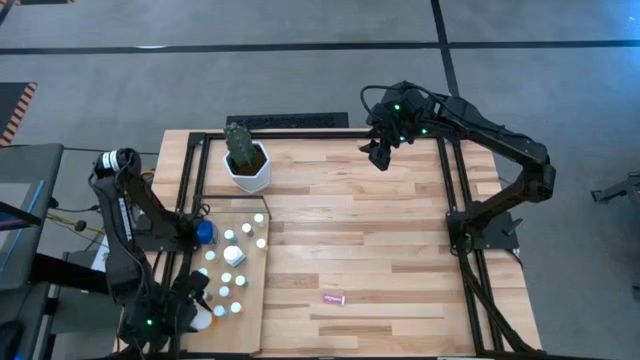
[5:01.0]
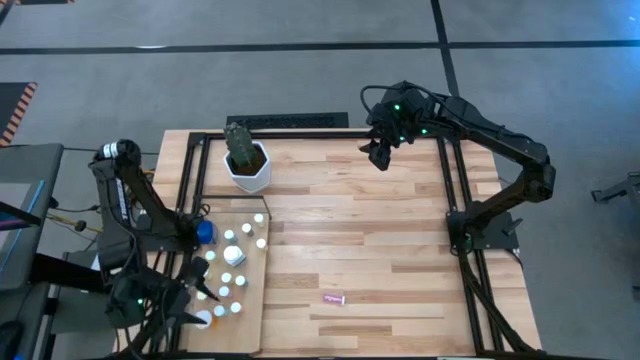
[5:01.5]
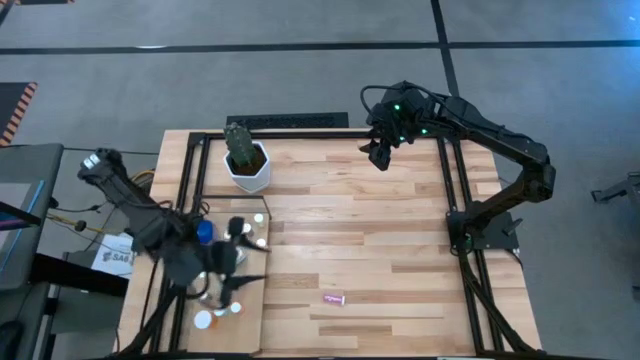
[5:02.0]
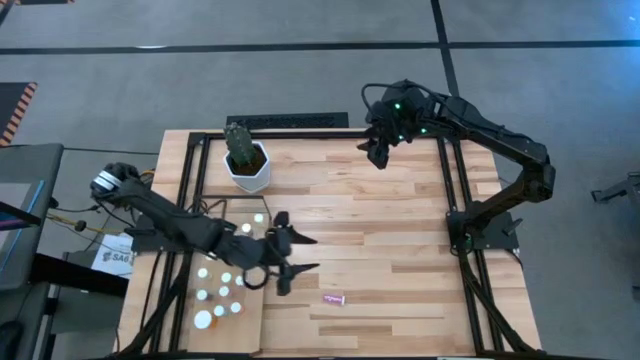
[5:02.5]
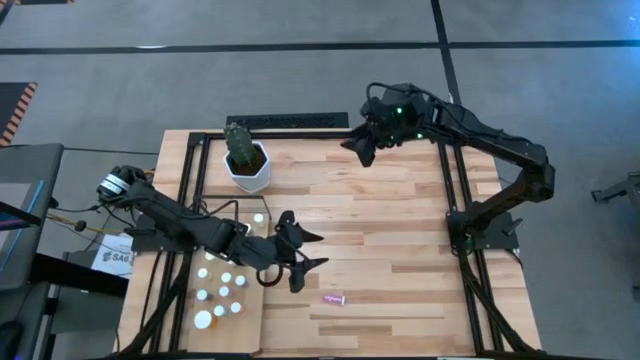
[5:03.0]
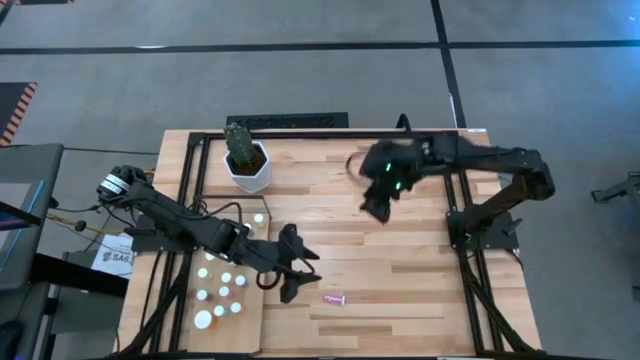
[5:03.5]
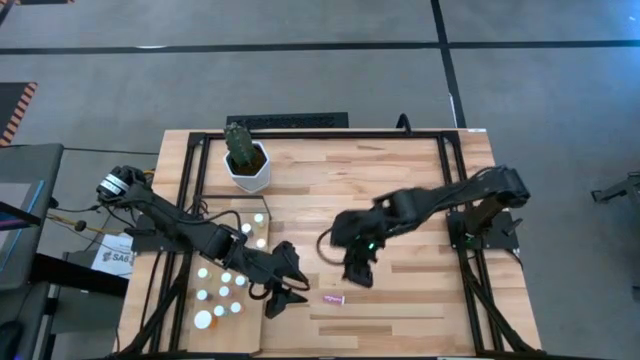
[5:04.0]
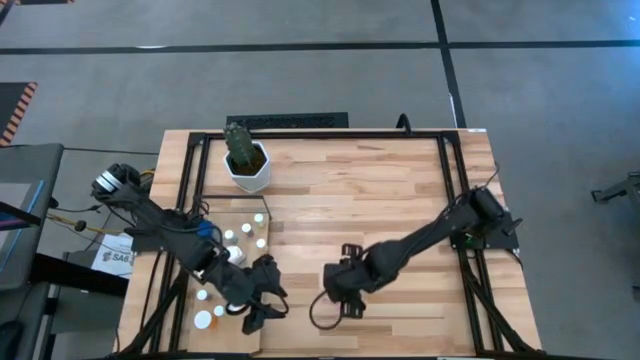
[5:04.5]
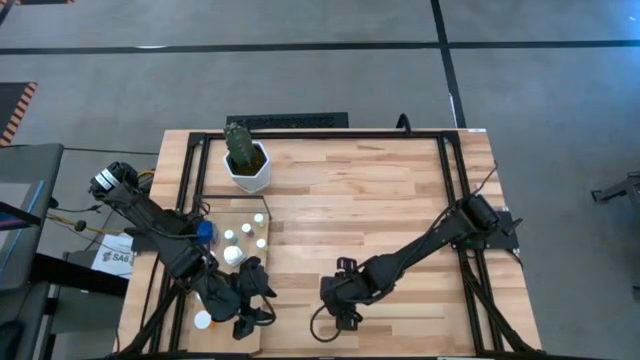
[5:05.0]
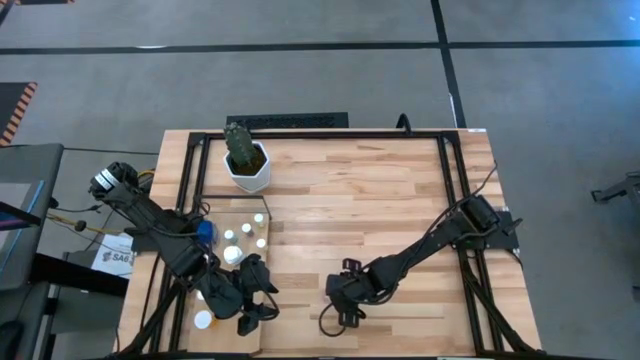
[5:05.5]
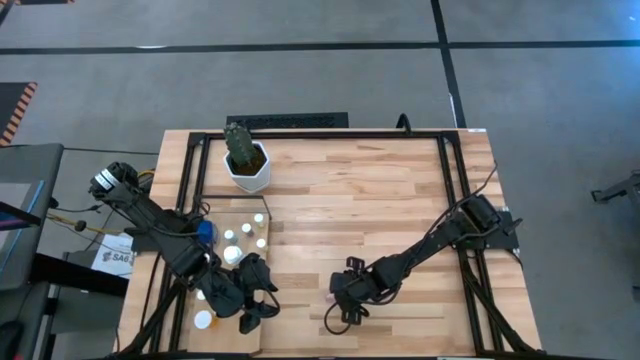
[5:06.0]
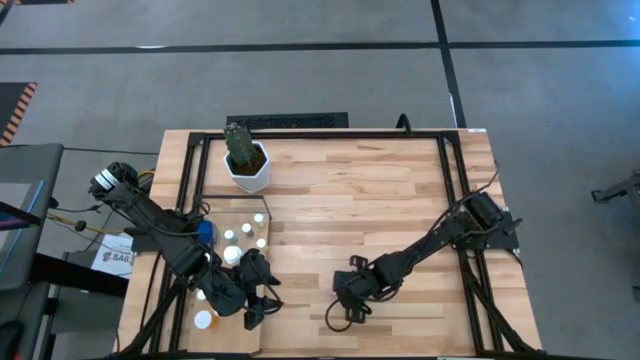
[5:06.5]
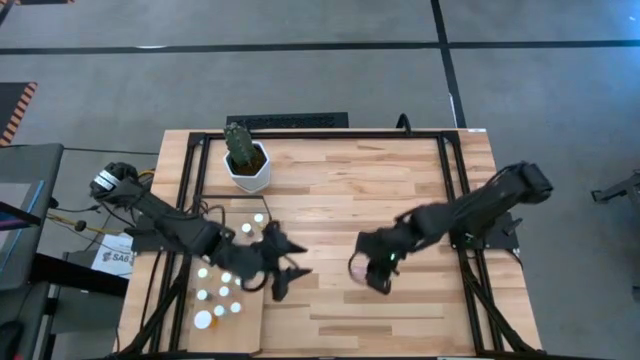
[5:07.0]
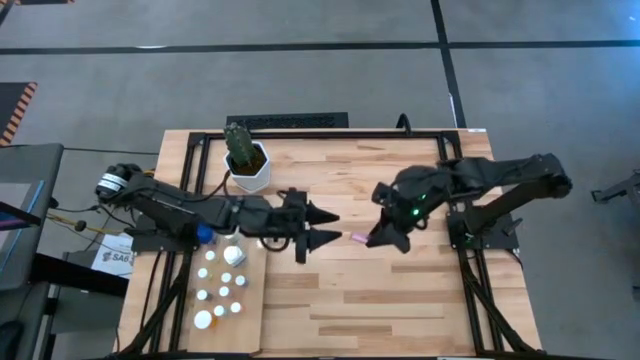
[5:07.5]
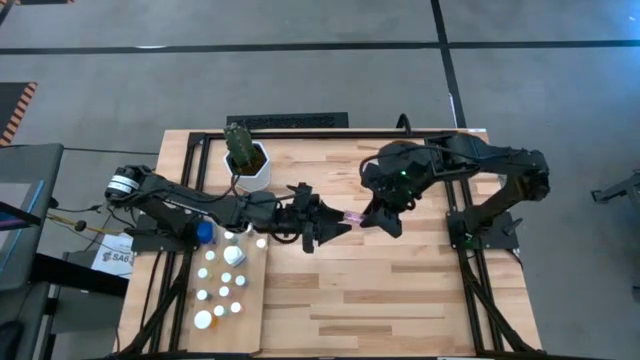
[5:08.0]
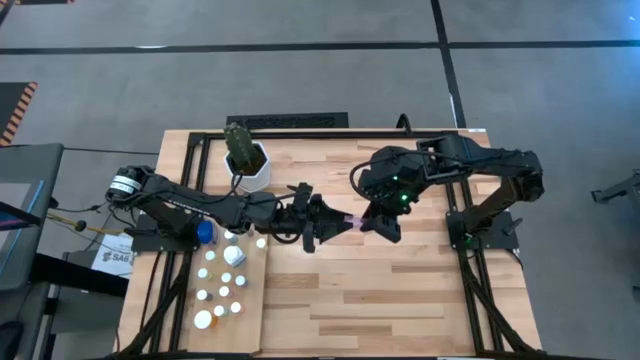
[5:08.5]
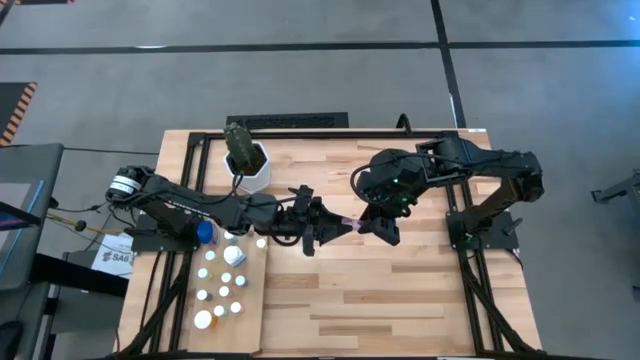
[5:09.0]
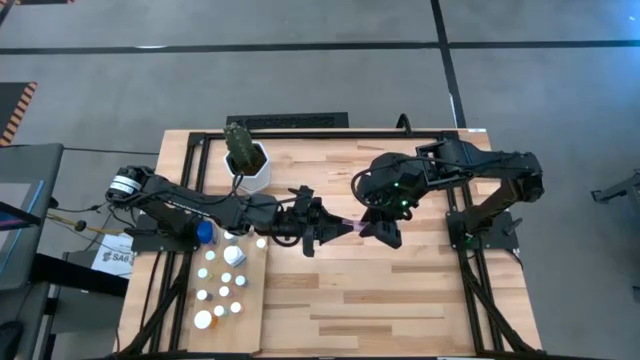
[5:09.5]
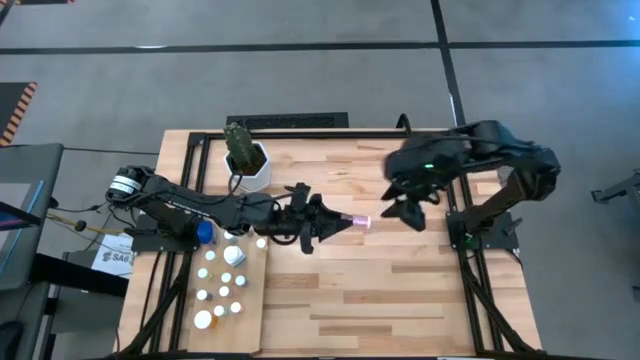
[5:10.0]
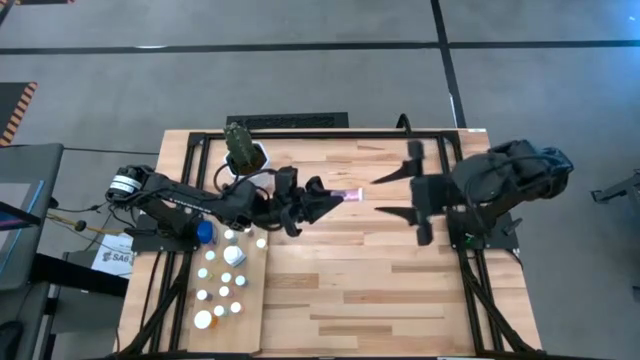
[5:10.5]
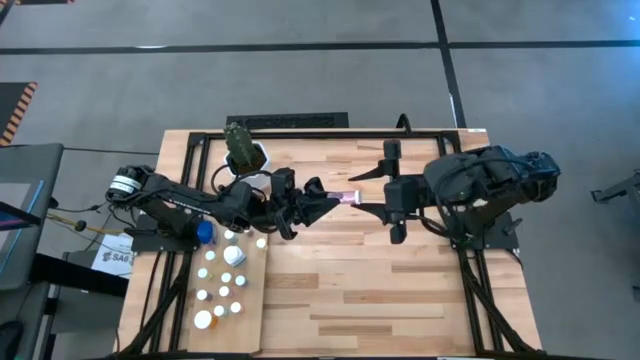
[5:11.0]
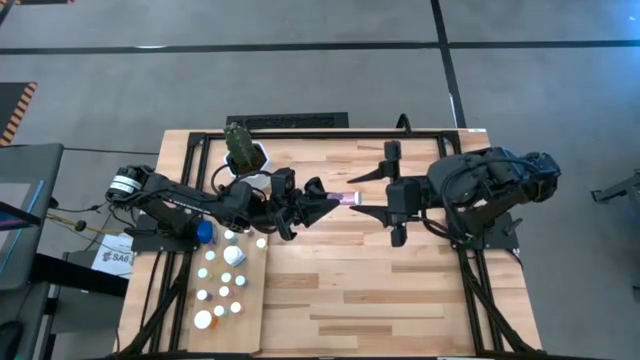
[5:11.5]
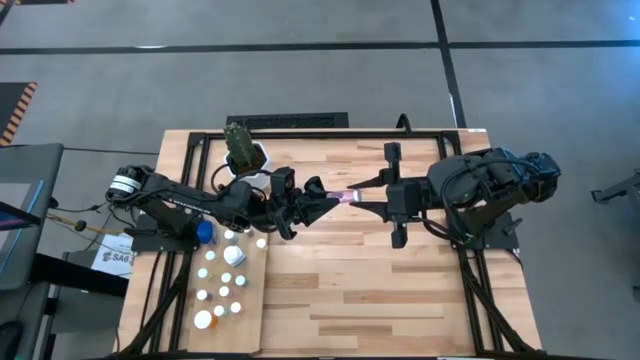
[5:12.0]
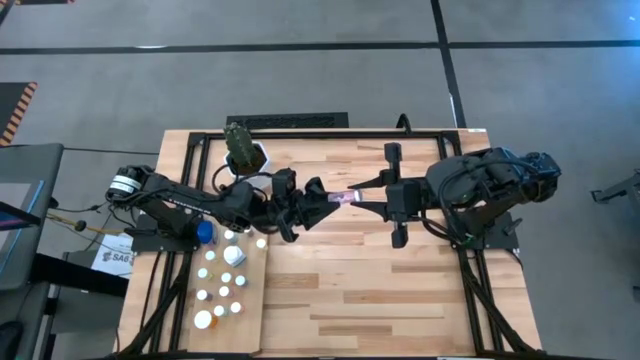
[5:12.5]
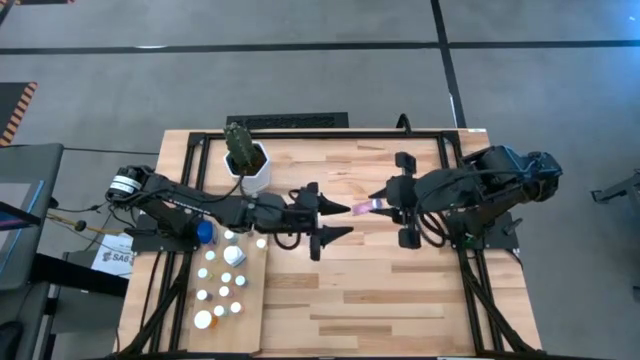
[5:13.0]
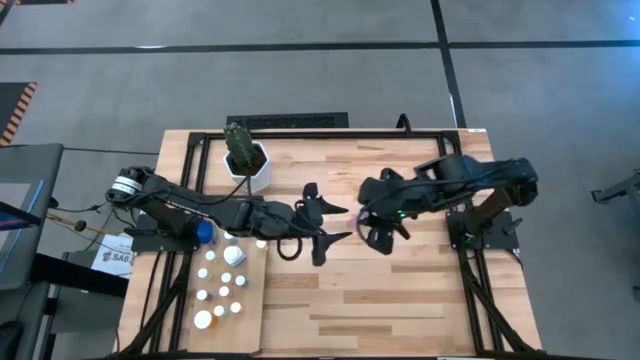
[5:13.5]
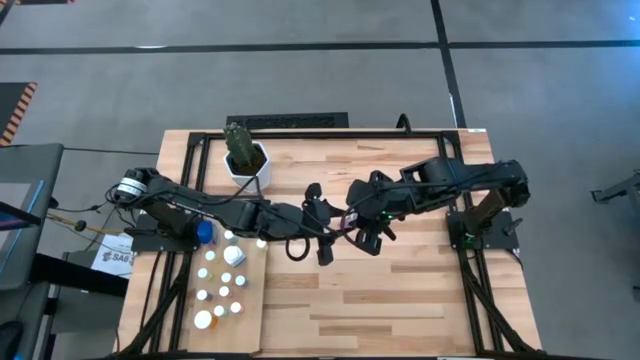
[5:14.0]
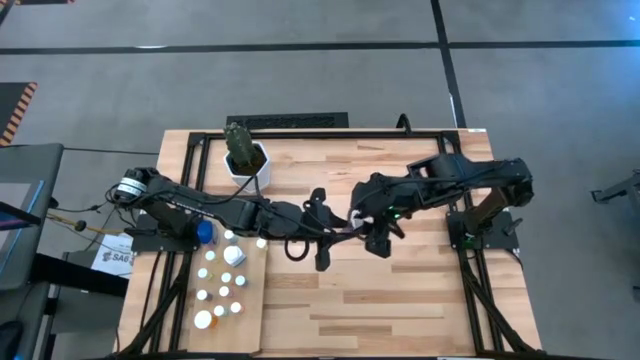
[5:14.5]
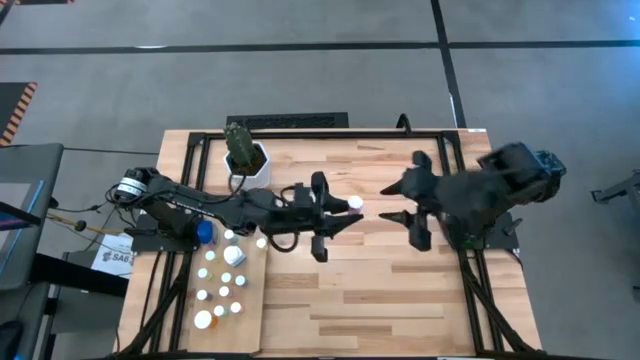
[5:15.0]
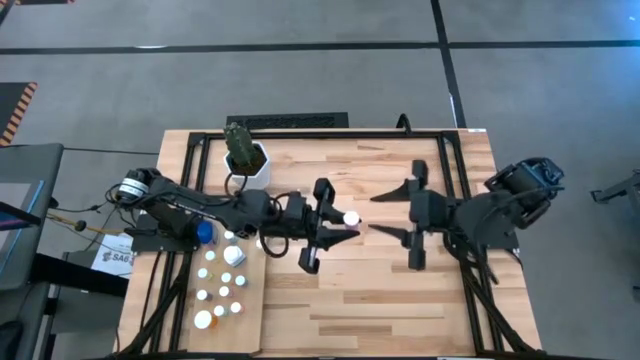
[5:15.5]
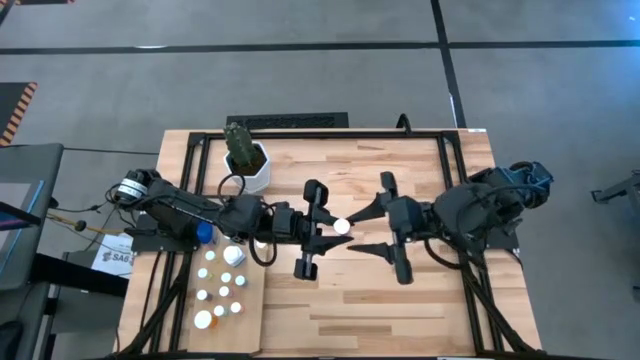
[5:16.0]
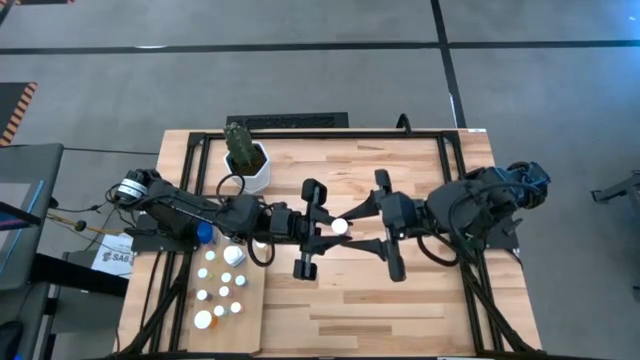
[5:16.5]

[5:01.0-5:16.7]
Task: Pick and place medicine bottles onto shelf by color
Put the pink pill bottle on the shelf
